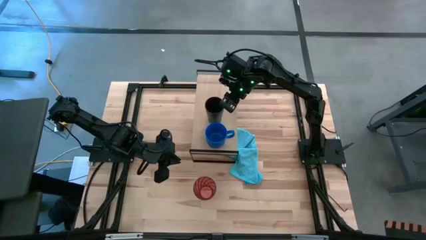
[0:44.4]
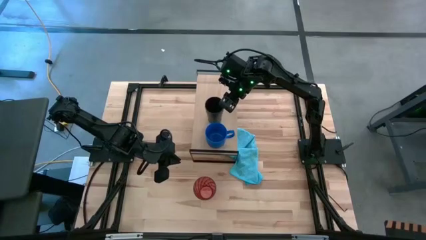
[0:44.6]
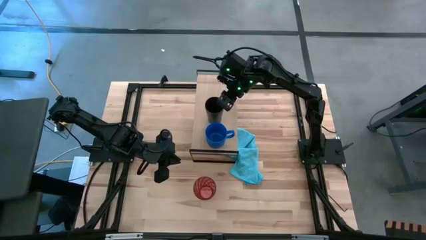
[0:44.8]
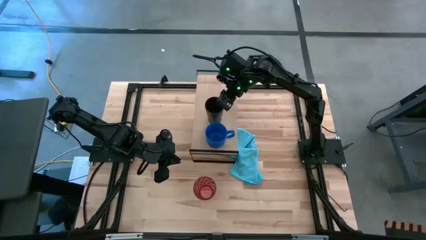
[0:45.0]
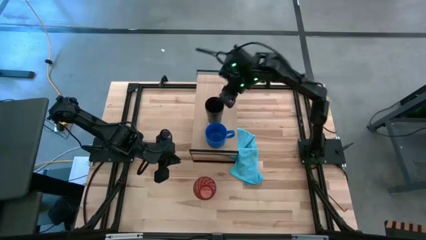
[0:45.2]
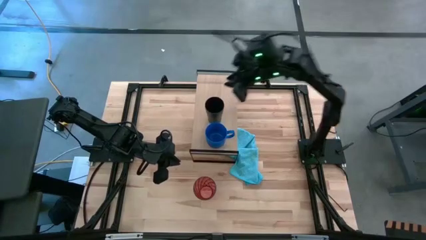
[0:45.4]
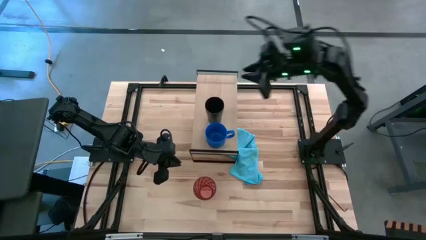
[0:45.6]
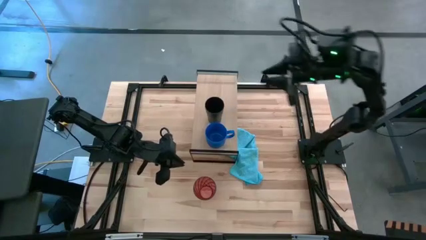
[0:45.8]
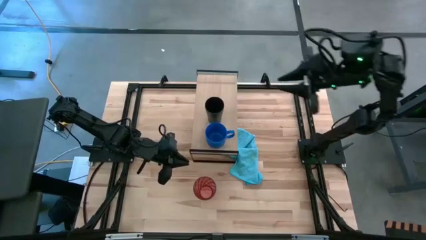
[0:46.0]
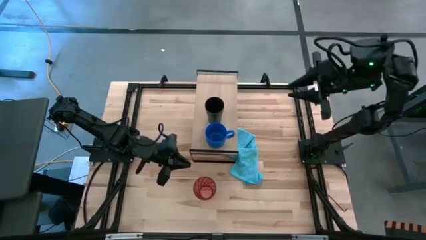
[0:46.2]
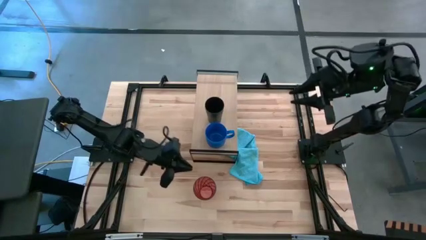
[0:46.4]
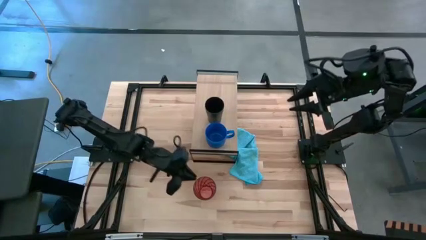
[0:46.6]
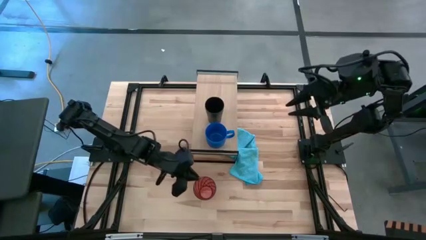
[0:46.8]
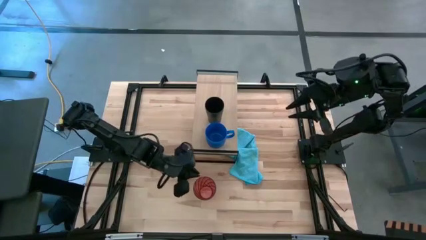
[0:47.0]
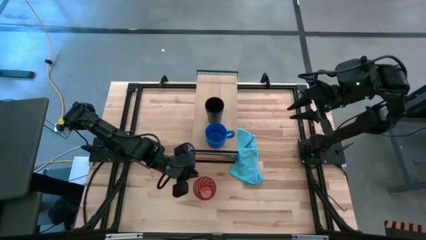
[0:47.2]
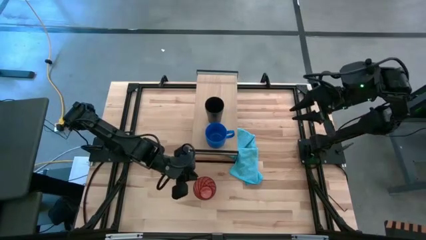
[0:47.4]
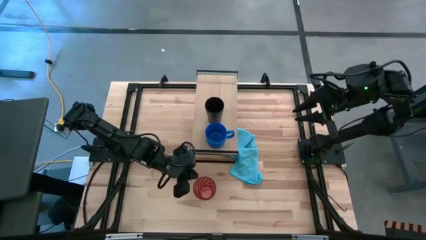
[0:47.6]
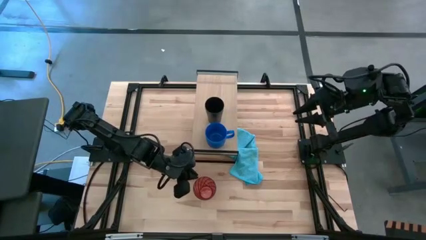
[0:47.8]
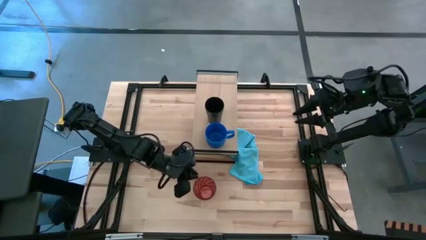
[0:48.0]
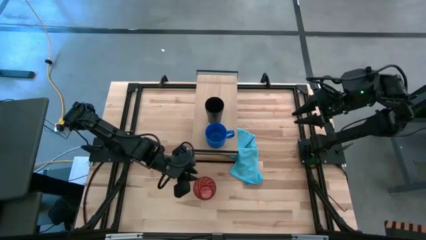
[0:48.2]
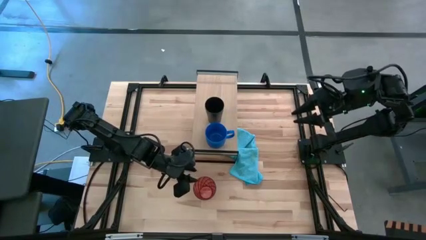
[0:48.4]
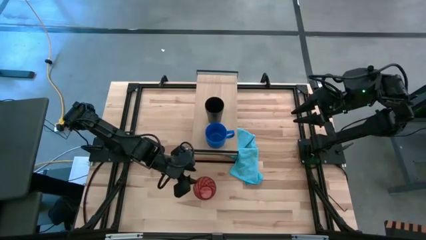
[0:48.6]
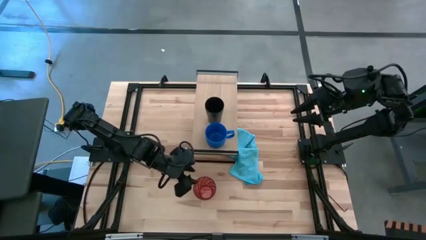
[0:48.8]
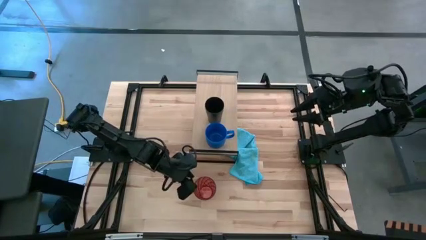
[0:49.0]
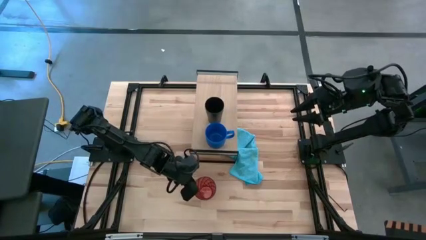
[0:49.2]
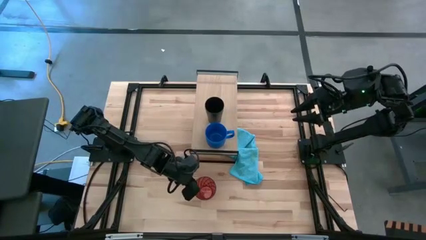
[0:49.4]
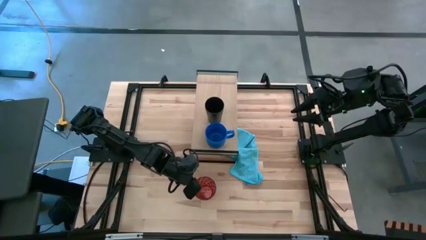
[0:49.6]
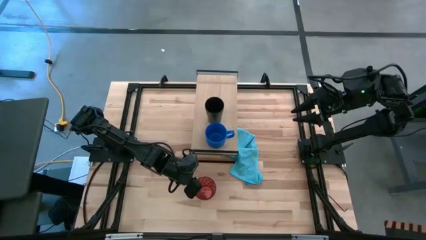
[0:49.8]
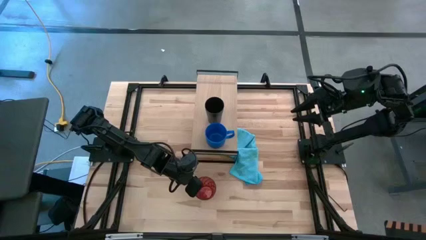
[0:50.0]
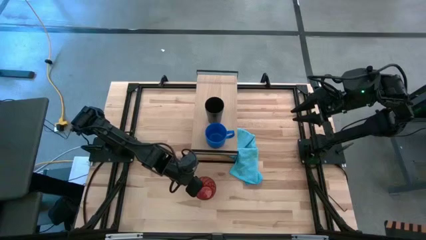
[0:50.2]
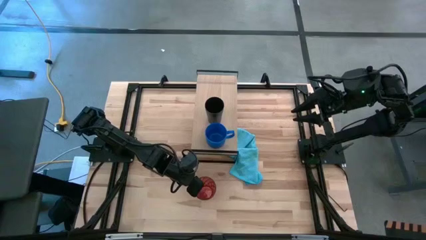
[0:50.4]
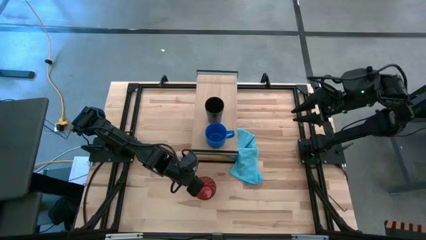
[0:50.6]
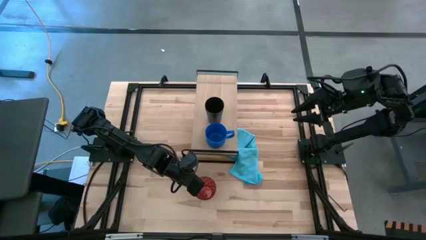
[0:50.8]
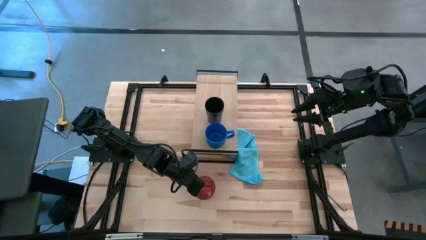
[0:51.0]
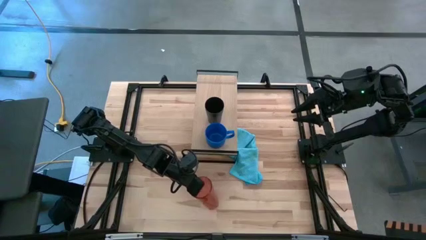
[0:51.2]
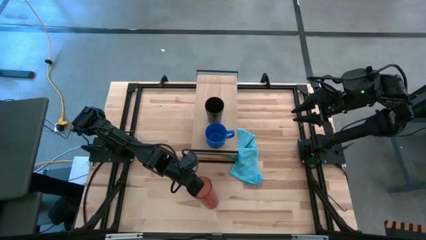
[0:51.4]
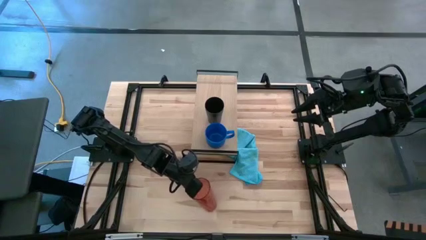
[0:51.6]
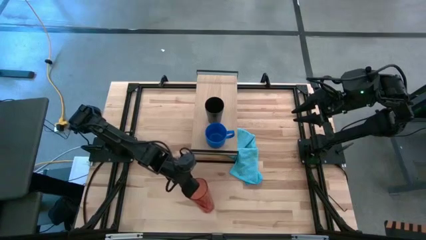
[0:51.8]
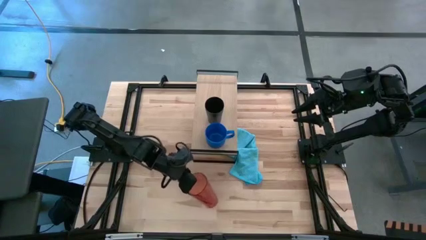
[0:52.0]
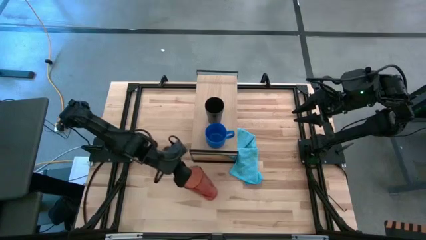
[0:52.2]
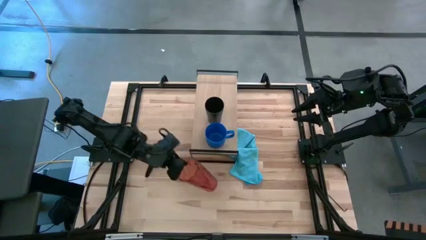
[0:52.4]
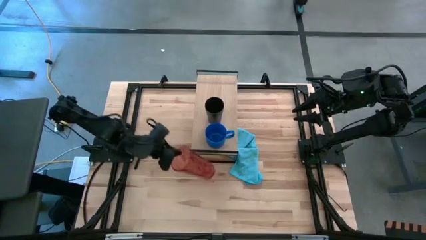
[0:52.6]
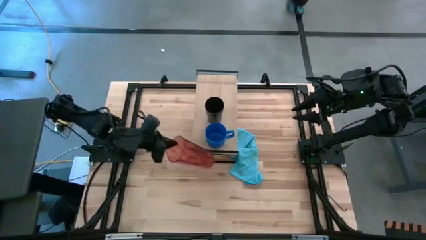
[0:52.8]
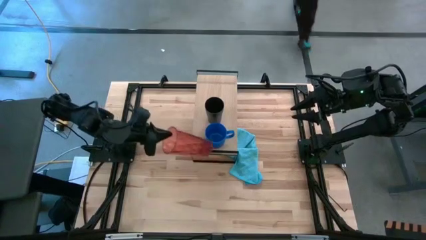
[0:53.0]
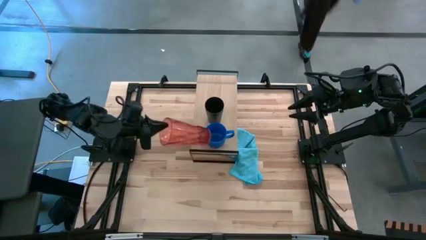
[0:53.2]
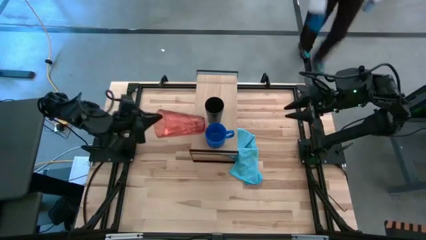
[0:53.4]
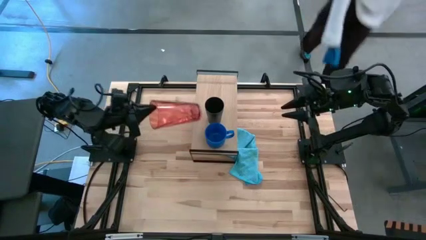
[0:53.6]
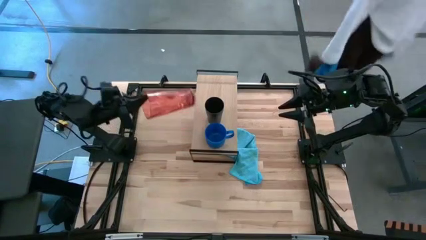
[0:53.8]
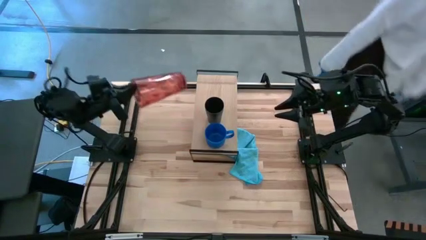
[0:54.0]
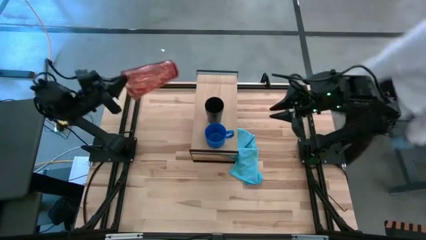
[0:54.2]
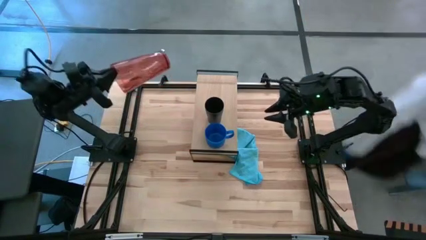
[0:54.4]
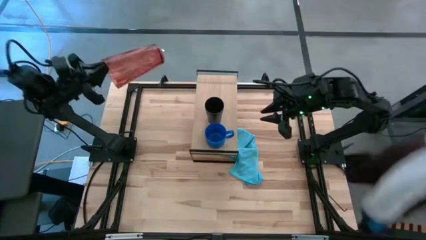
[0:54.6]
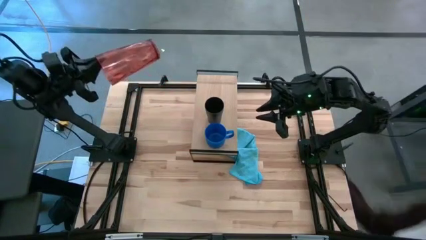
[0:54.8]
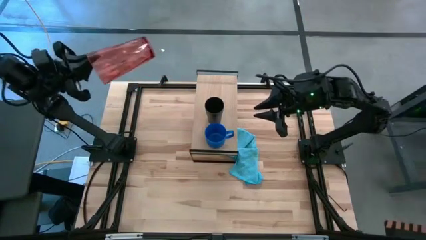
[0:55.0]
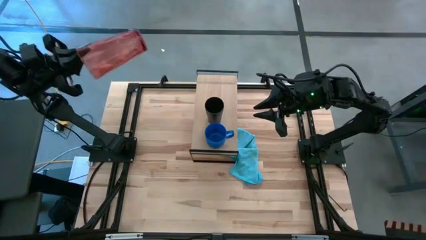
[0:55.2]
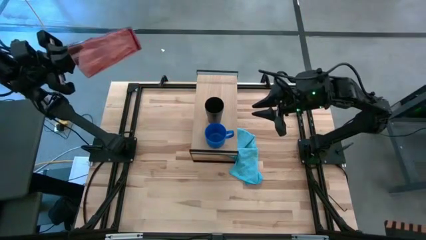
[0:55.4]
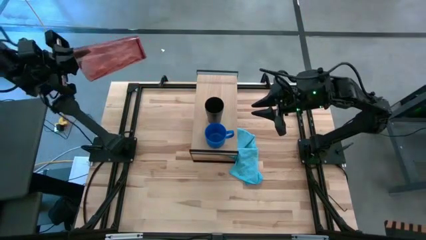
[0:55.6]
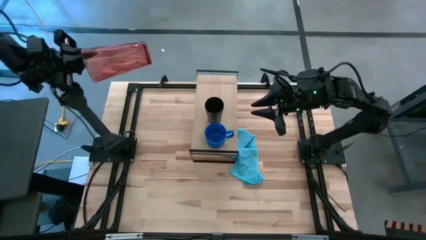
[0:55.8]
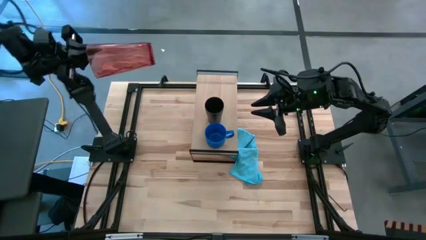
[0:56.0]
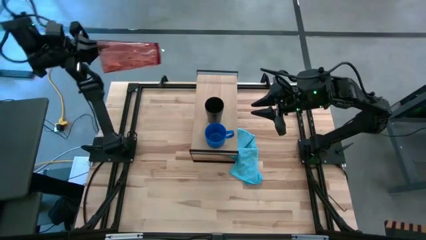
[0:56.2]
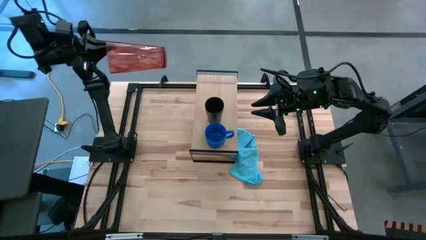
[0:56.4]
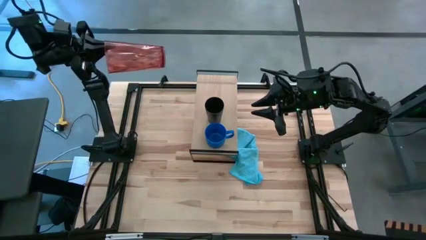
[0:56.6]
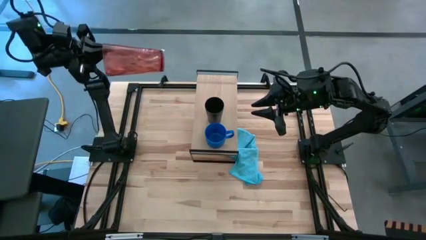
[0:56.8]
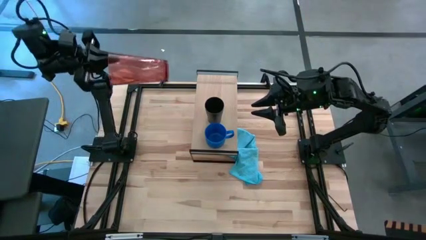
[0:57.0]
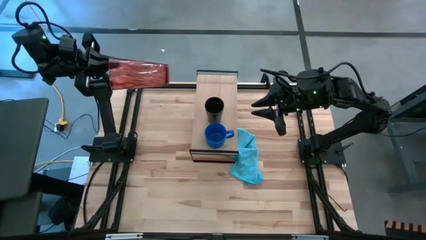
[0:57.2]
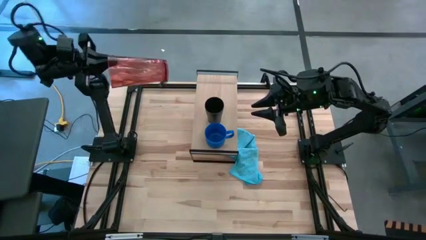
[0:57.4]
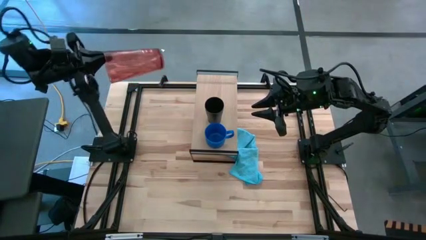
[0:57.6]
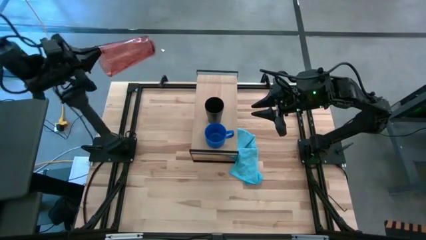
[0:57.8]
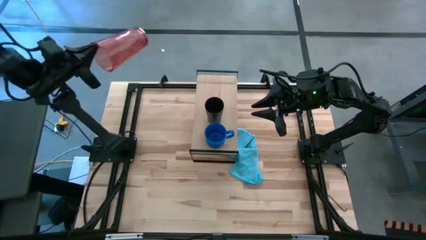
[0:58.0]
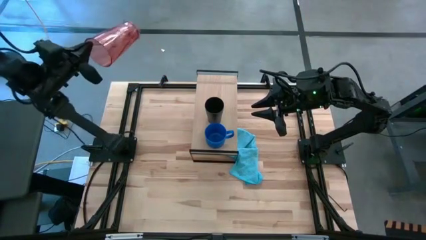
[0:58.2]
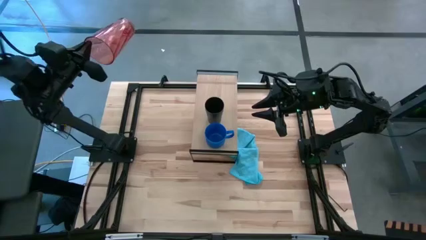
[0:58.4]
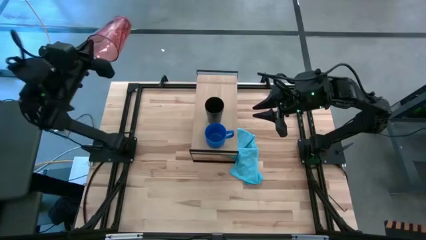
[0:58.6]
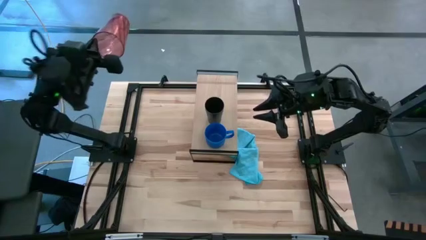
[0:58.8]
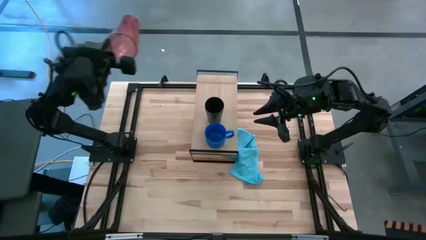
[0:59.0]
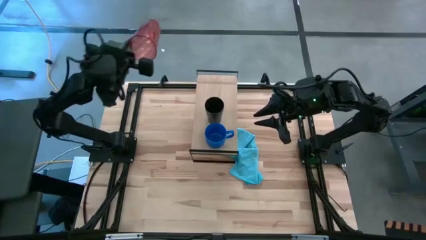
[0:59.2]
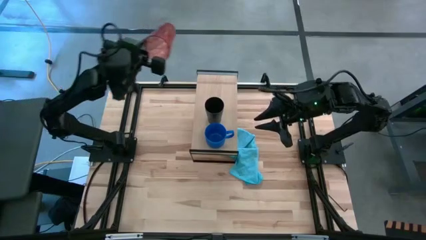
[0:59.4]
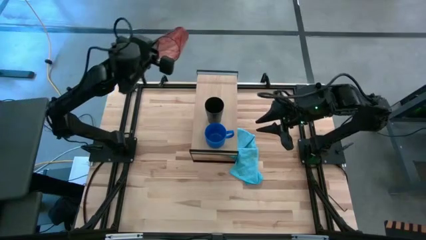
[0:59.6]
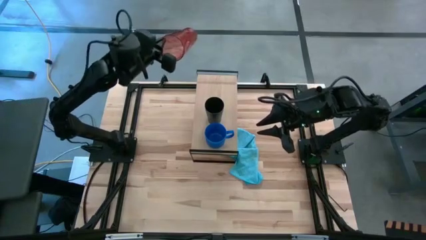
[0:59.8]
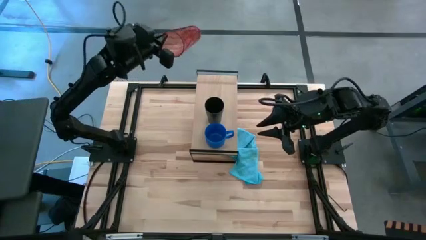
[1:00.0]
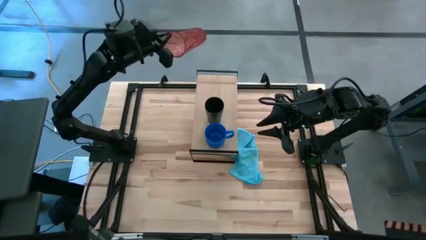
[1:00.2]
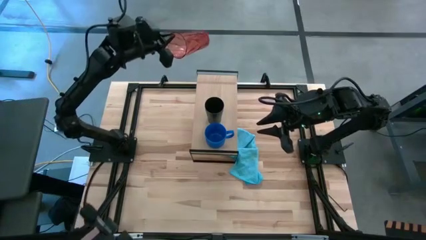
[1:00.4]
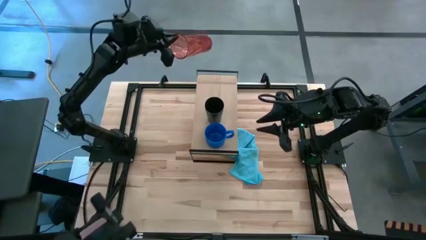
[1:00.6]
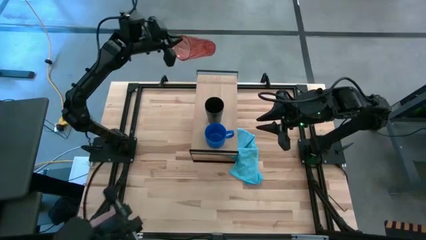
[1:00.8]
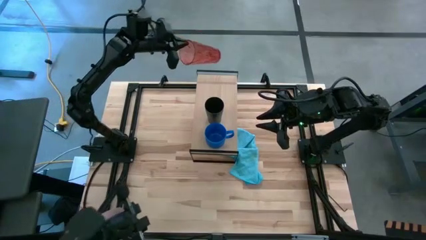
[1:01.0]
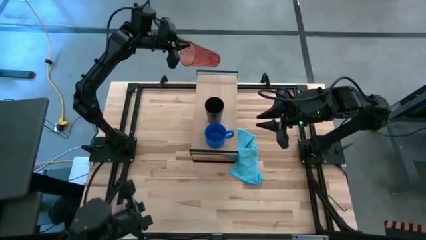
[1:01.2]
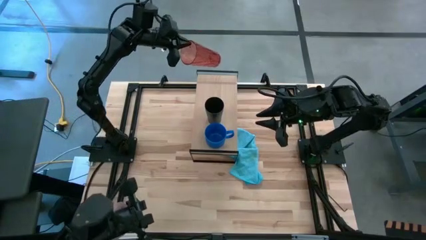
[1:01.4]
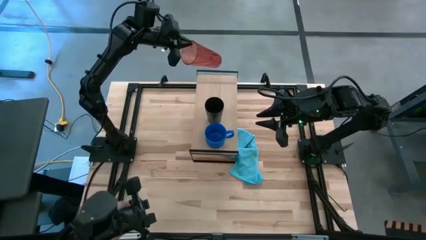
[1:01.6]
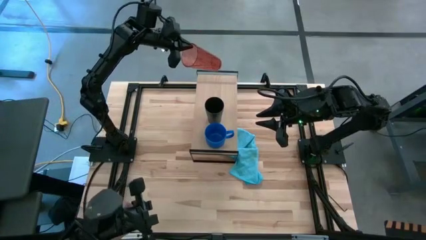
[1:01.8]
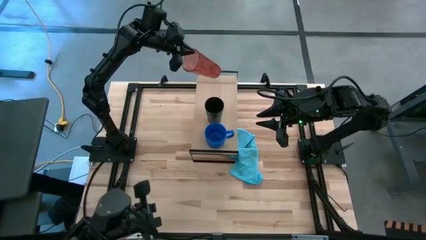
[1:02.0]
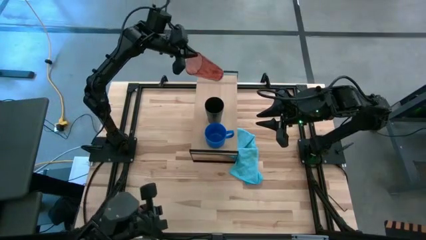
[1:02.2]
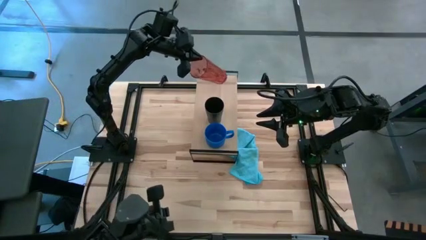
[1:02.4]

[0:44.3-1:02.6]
Task: Stack small to large cups/mugs on shelf
Put the red glass cup on the shelf
